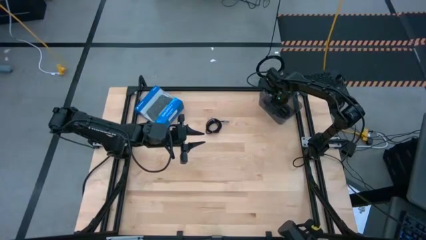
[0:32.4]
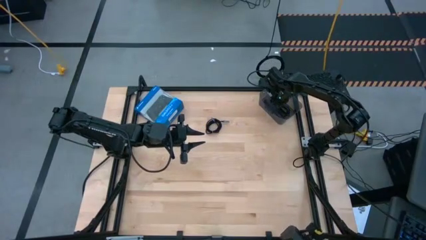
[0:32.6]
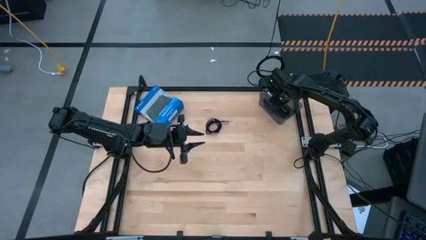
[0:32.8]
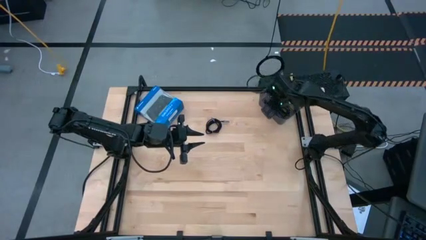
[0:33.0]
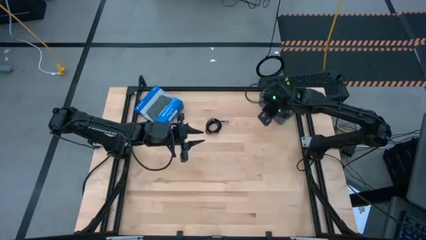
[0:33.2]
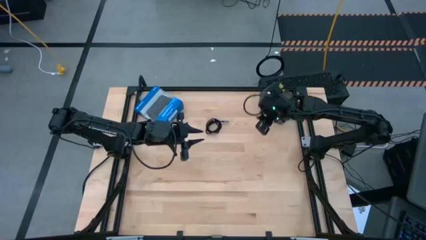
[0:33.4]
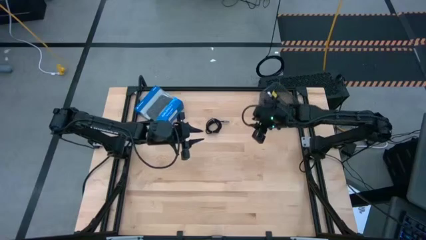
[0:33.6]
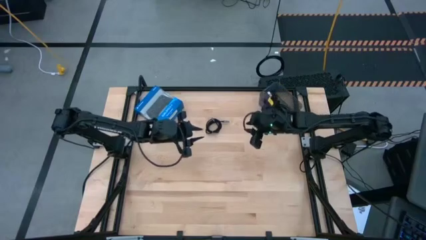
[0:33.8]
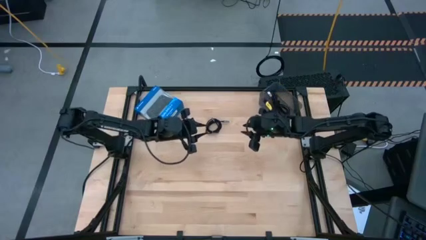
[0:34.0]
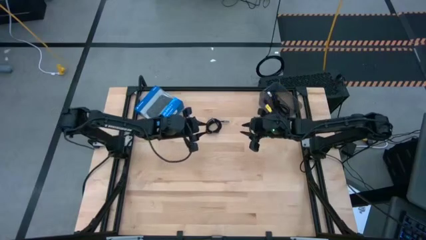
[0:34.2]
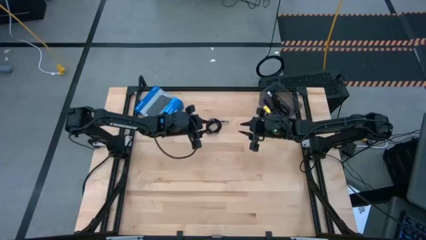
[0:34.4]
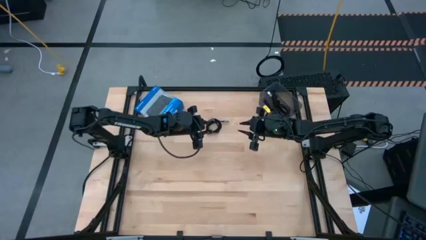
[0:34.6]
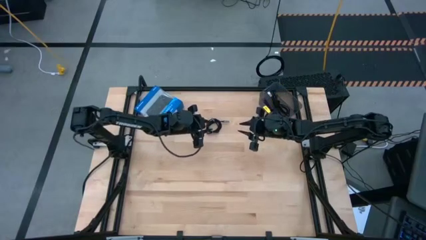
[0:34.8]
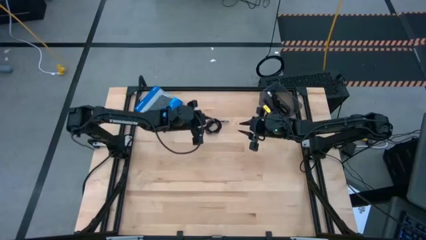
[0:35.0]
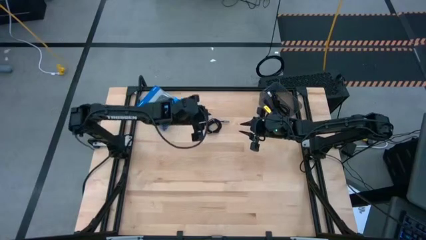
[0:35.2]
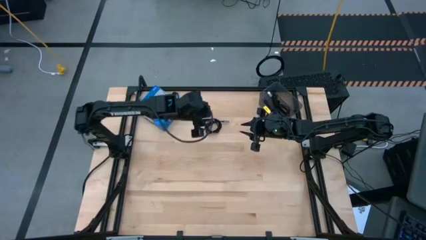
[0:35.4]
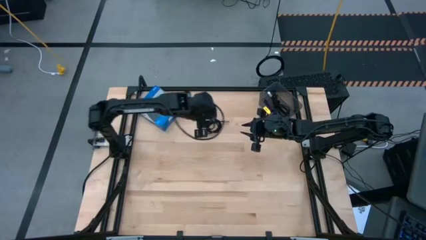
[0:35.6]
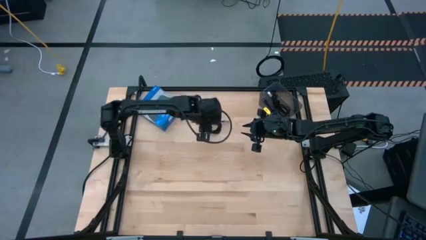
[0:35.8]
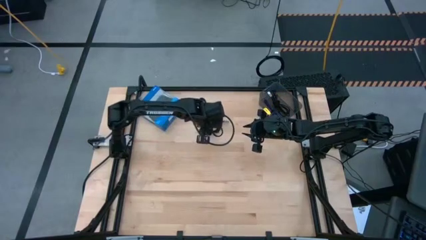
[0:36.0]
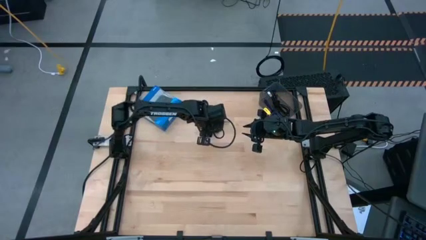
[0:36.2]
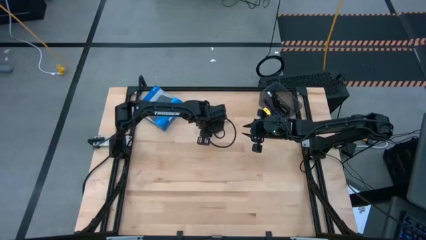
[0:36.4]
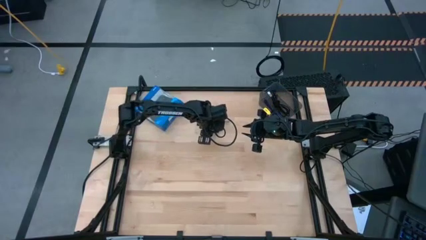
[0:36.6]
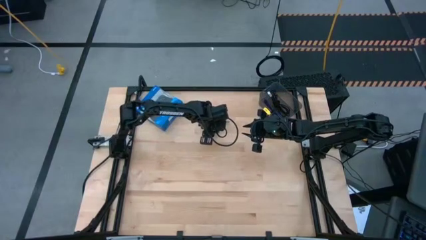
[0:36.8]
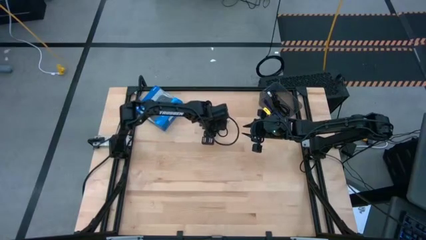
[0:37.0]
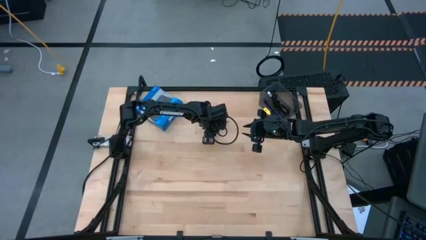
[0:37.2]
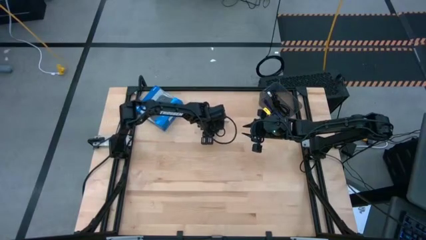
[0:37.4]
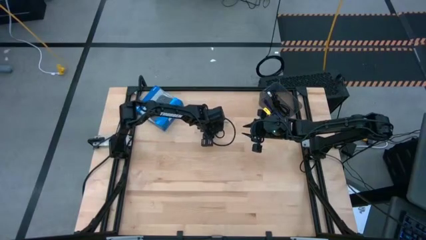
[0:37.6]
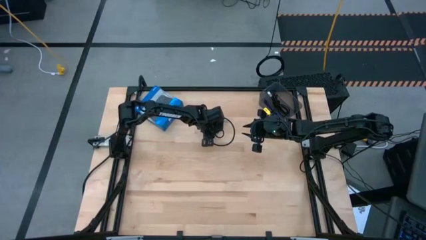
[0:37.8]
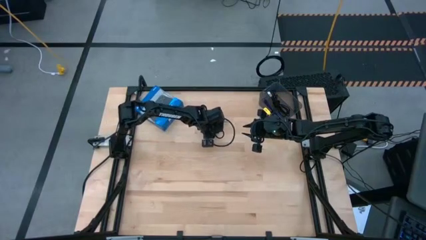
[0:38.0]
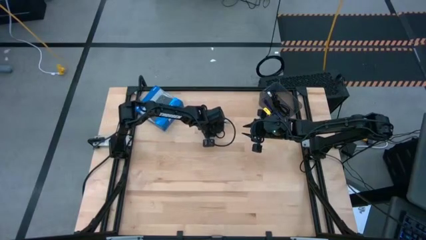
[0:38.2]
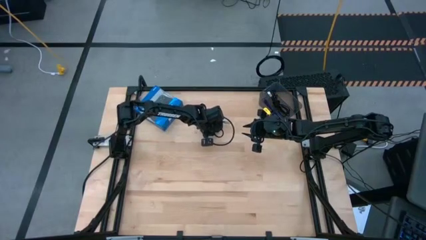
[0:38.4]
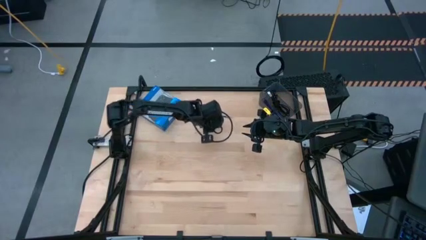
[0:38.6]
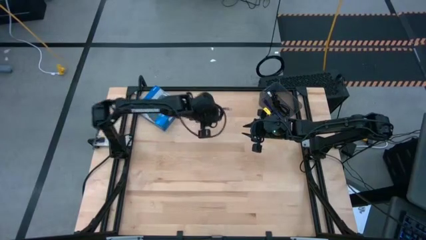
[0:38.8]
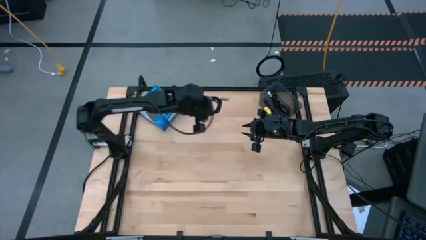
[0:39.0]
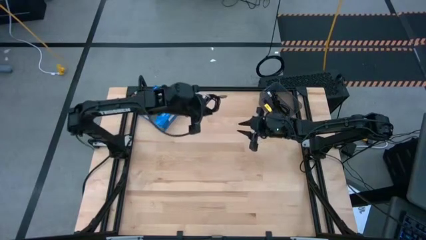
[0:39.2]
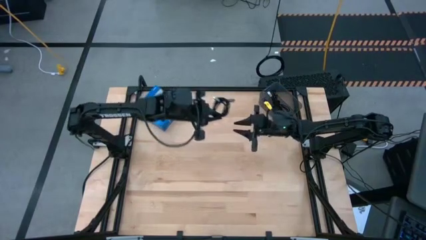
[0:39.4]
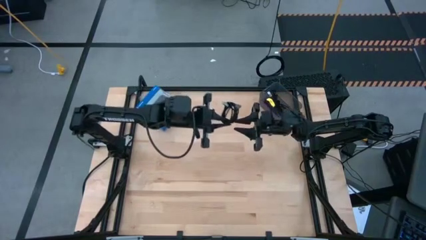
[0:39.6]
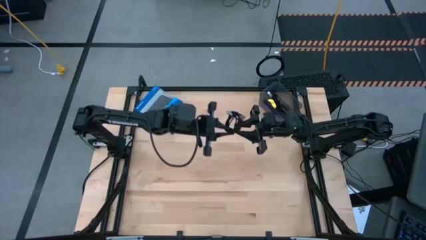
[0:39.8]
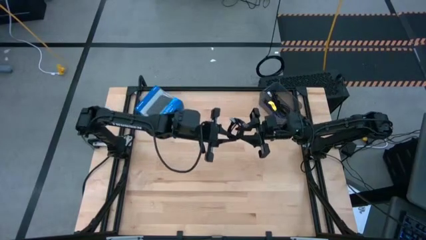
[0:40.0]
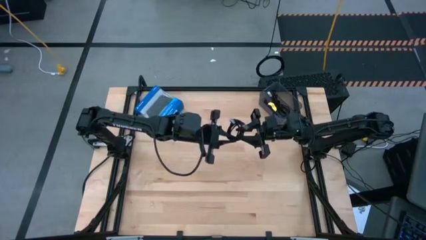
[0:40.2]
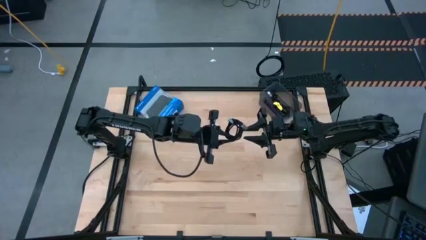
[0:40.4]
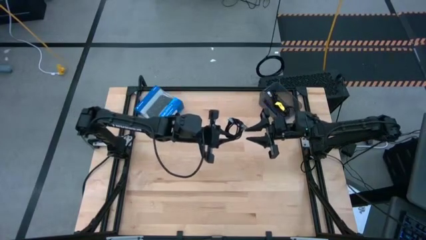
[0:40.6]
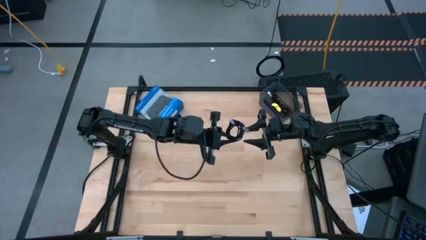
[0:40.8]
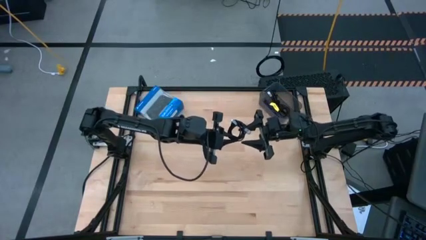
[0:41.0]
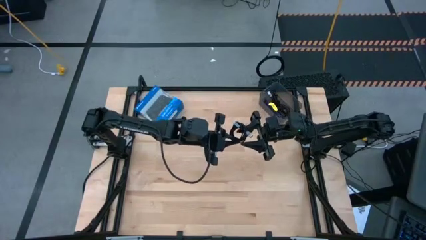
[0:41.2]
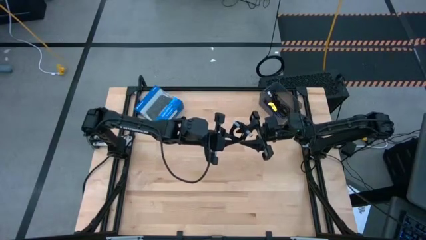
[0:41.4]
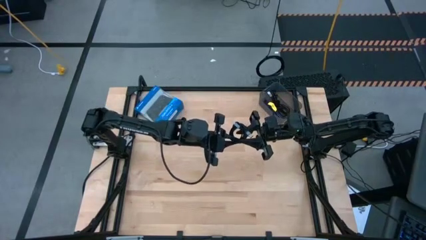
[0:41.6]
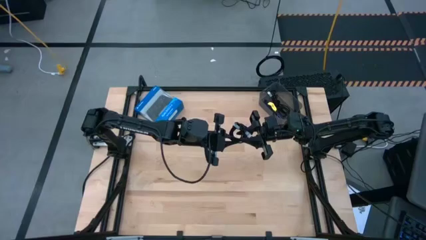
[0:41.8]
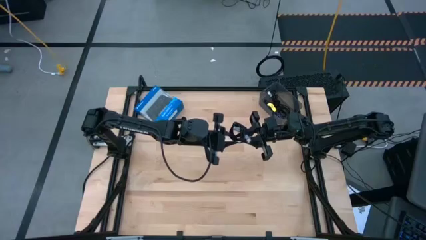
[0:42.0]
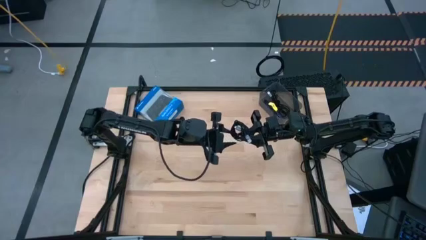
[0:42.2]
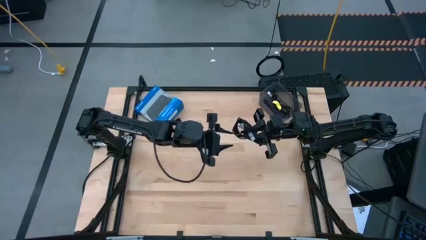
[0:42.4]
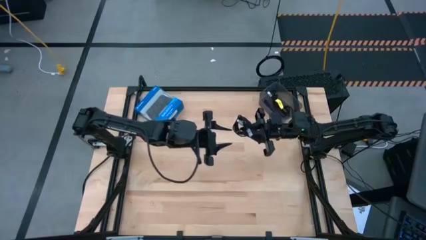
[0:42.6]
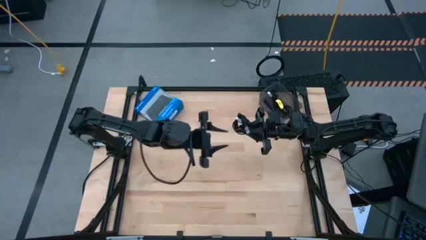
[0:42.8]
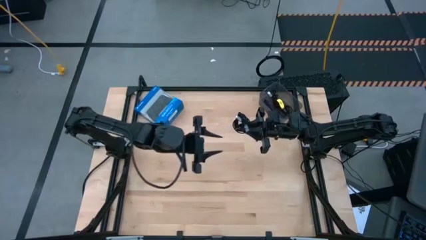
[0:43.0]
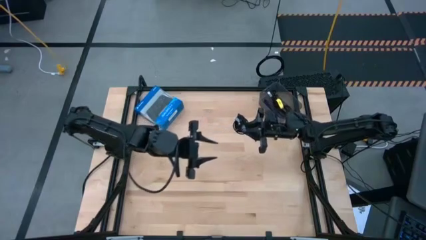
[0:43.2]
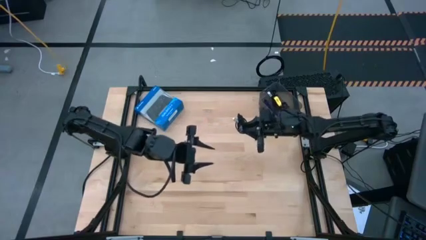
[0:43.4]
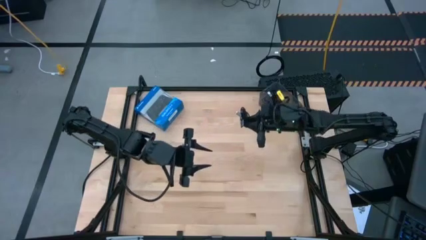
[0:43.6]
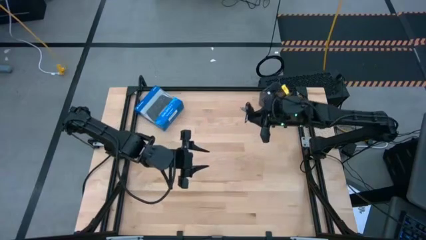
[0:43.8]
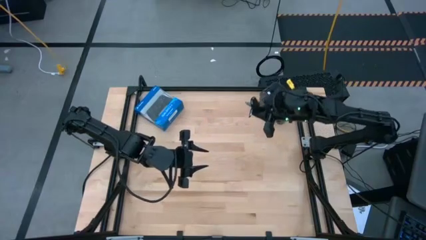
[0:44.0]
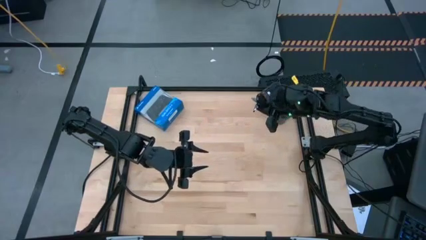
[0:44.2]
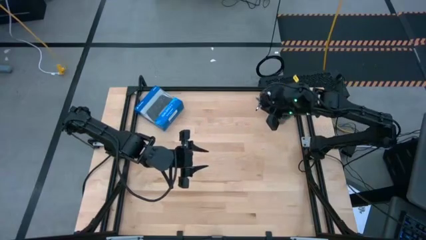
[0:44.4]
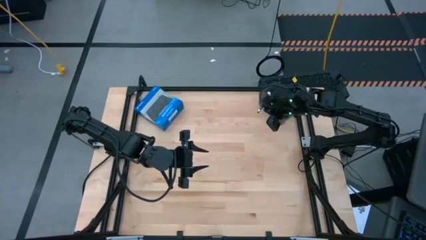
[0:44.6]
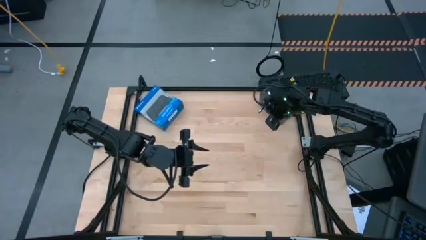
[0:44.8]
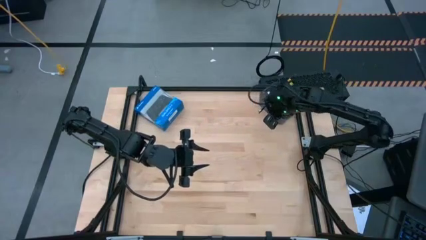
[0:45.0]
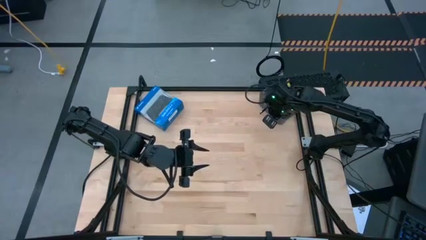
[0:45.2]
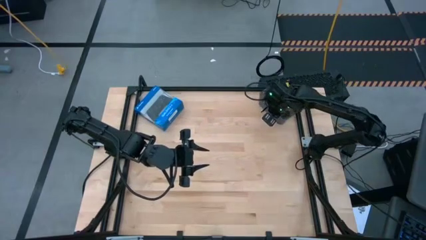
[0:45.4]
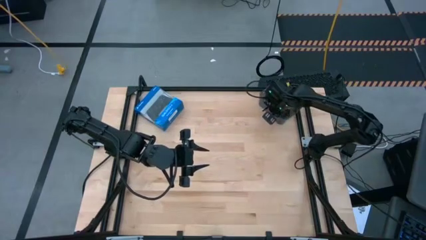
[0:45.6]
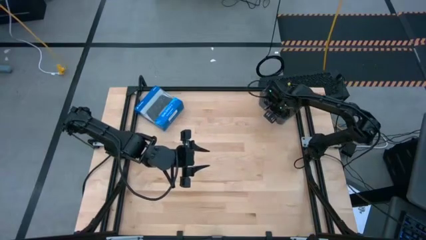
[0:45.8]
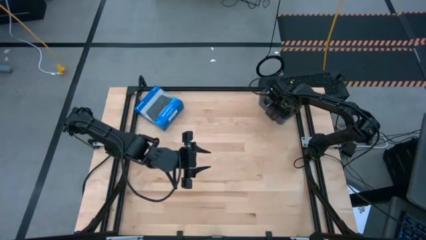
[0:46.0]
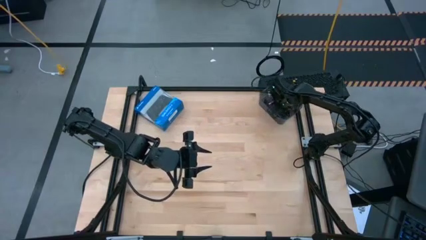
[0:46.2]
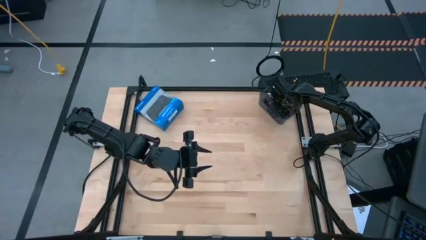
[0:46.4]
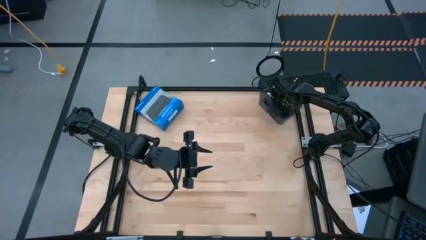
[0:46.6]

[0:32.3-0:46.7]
Task: Pick and place USB-C Cables
Put the black charger cable into the bin
